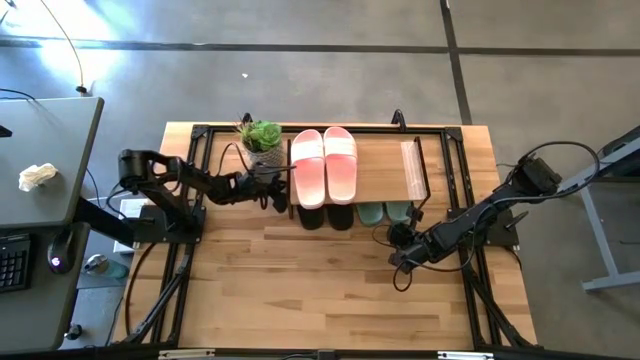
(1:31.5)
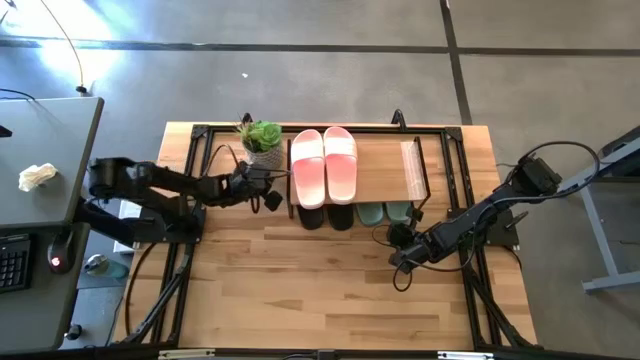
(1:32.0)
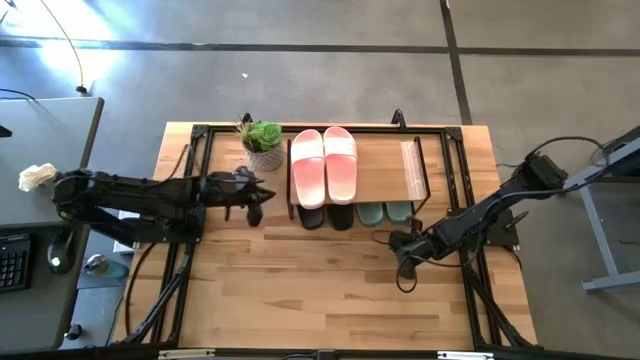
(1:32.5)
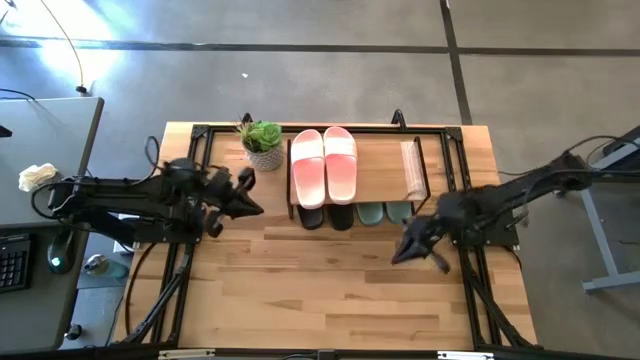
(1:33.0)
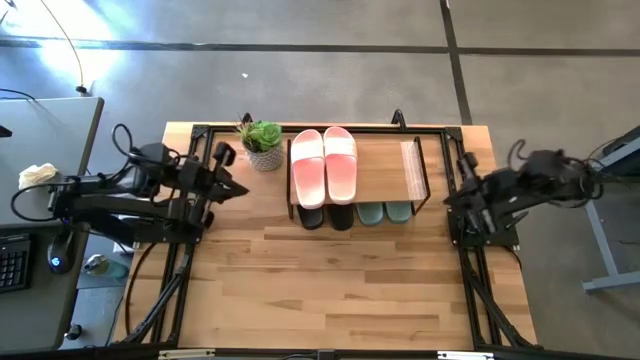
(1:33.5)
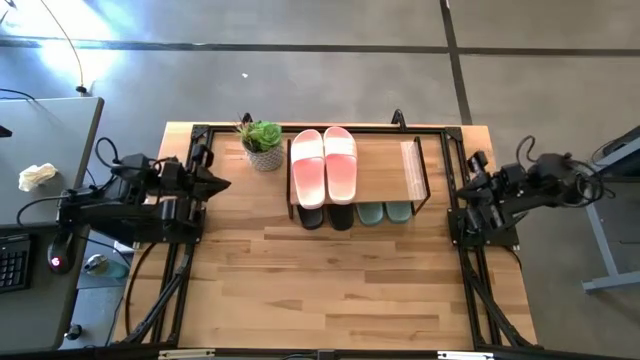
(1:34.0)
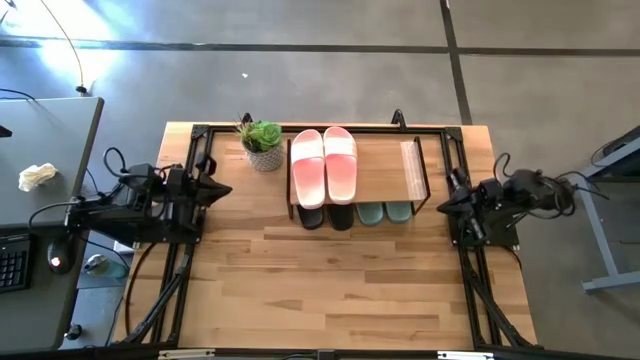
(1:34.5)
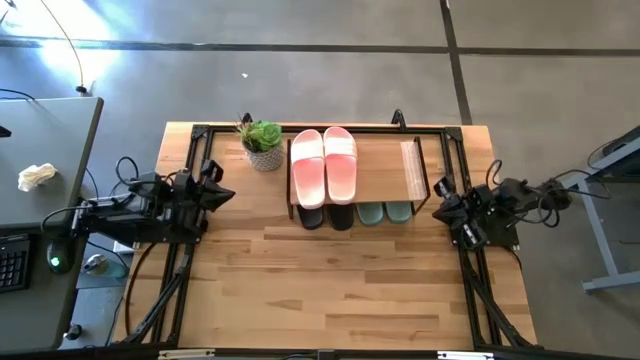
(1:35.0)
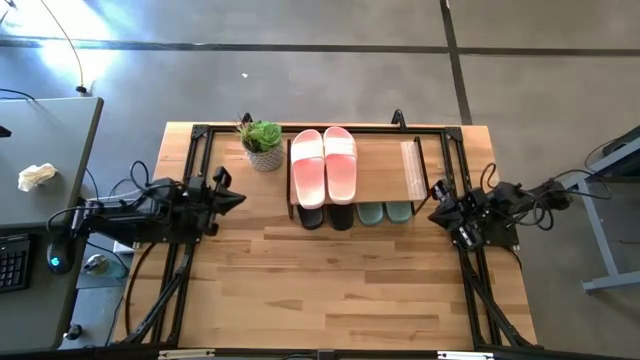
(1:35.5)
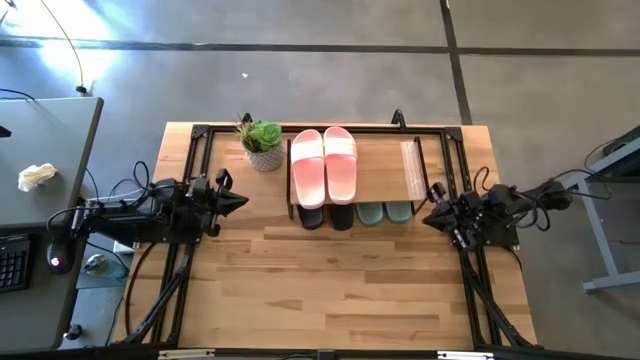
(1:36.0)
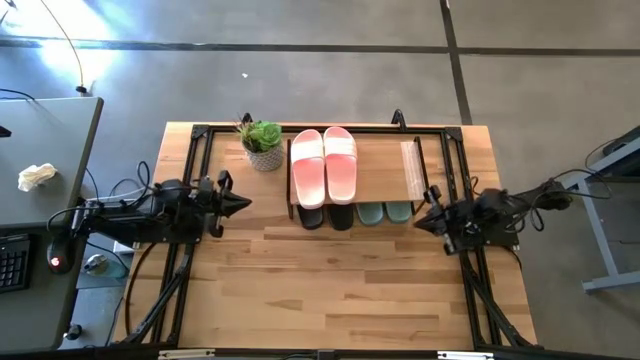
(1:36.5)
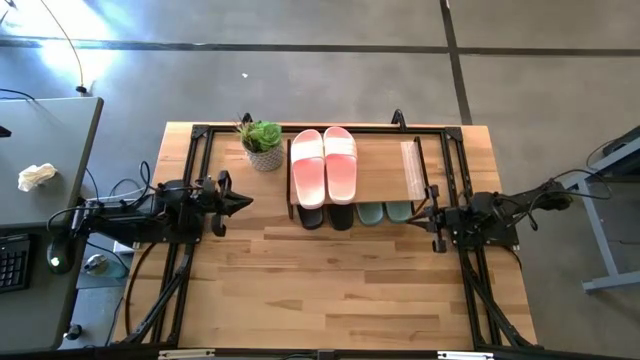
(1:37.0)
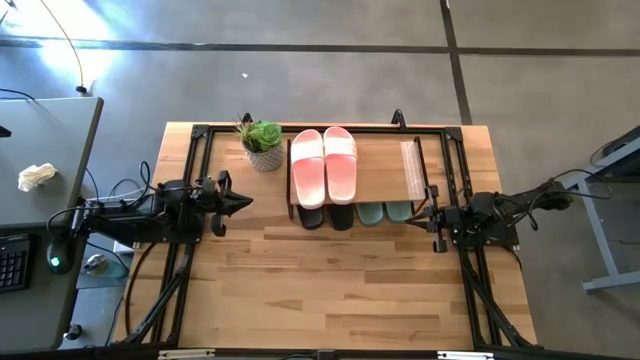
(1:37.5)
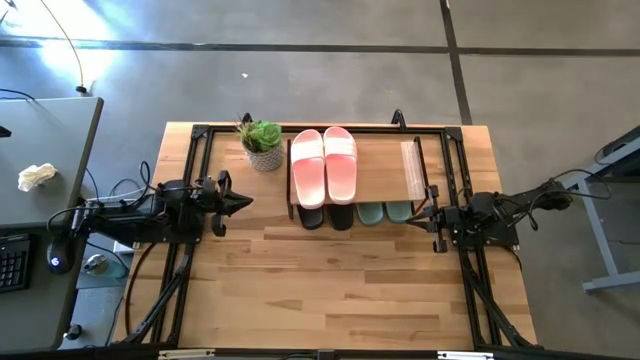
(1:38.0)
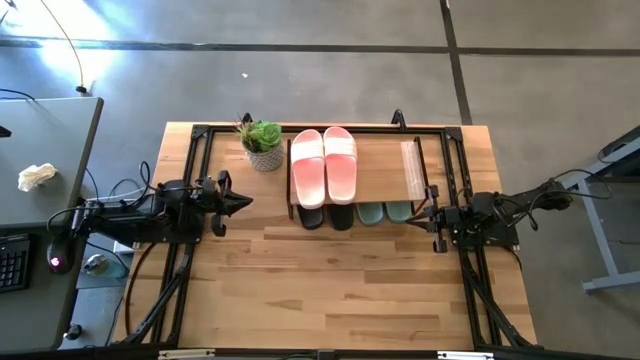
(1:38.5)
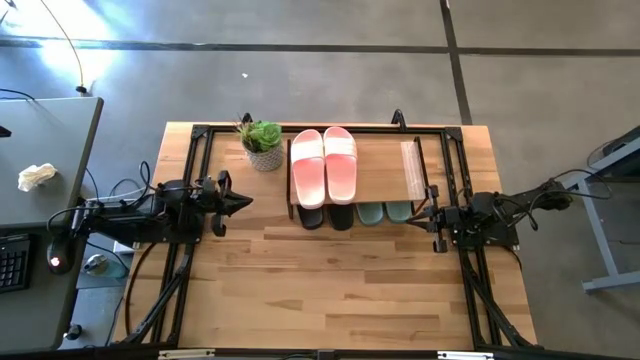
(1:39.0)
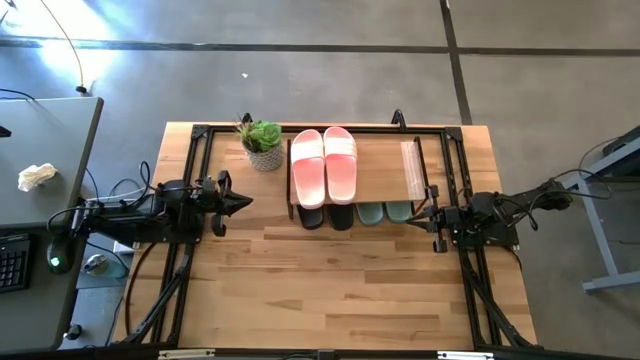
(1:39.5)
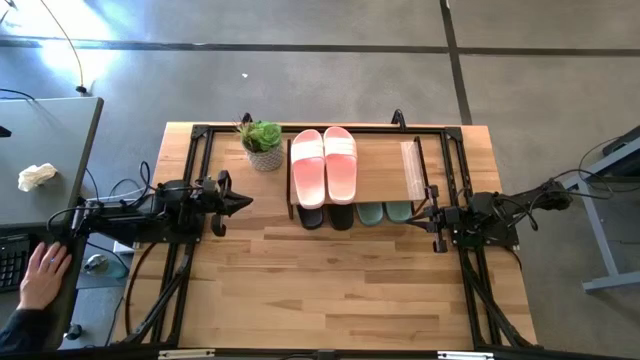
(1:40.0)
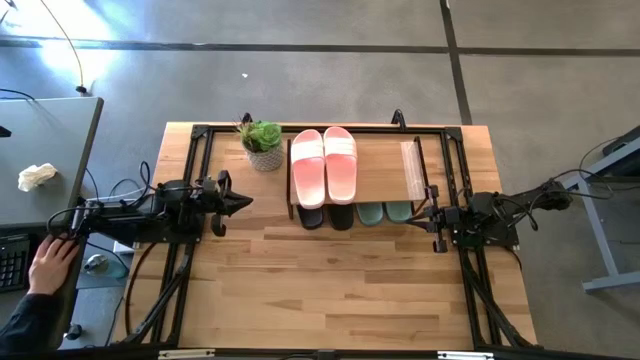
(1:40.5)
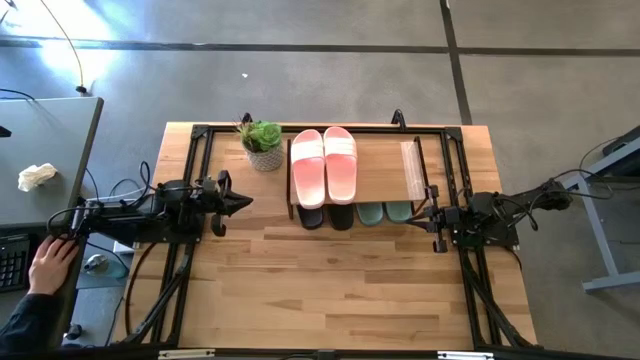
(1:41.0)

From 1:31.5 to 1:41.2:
Task: Pick and place slides into the shelf
Return to Home Position

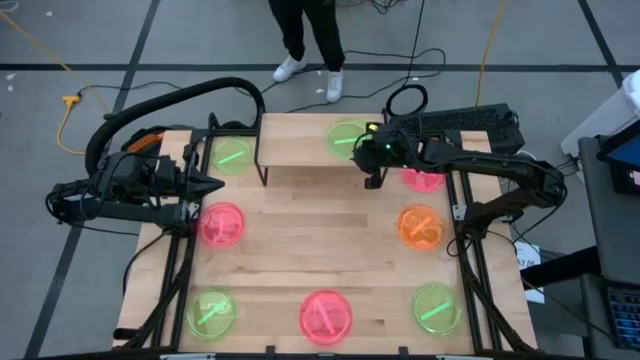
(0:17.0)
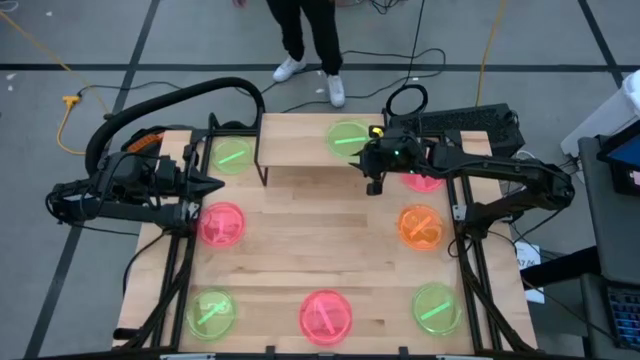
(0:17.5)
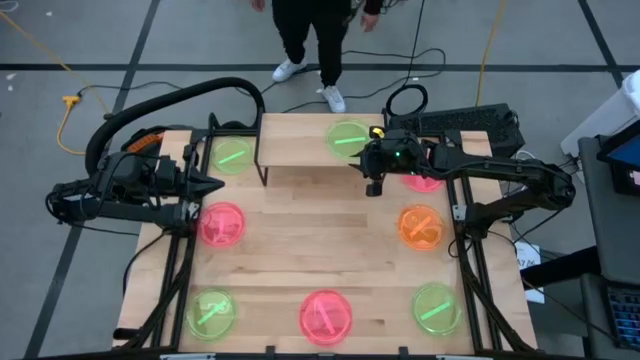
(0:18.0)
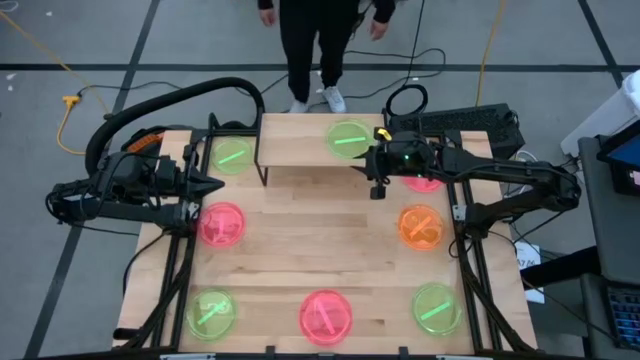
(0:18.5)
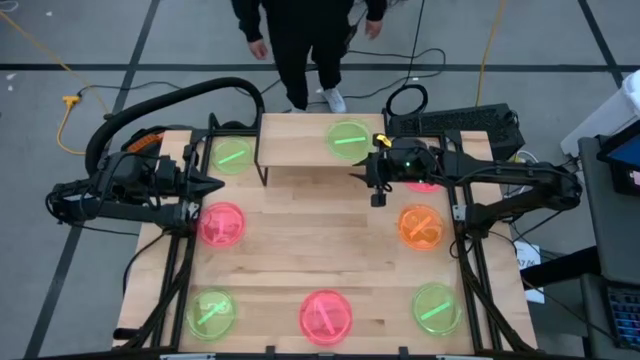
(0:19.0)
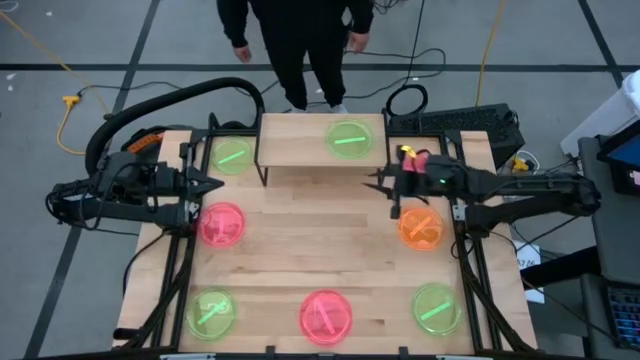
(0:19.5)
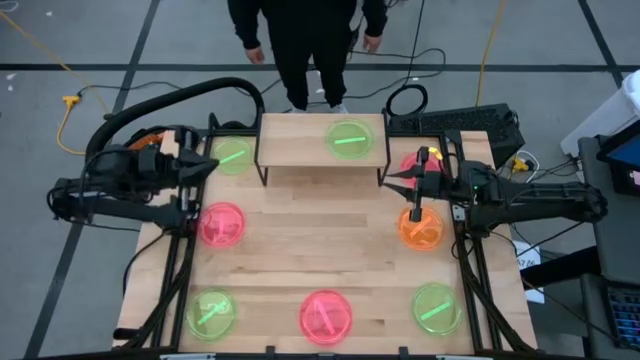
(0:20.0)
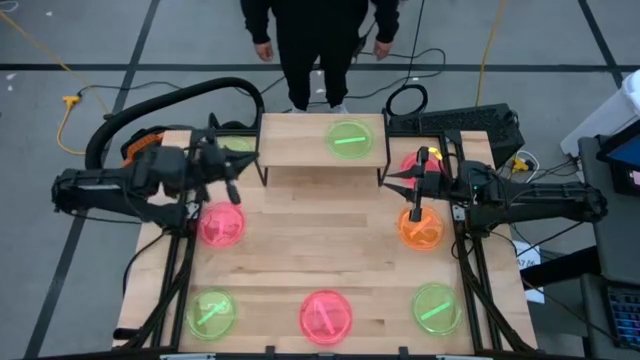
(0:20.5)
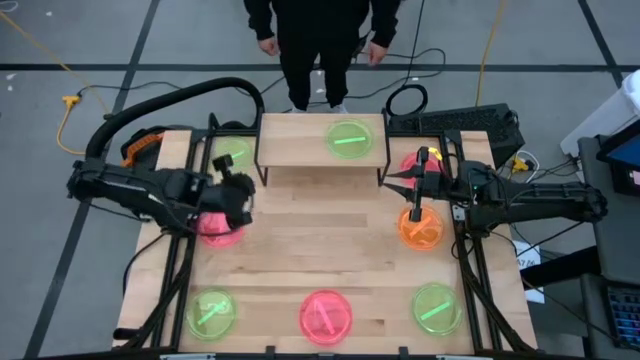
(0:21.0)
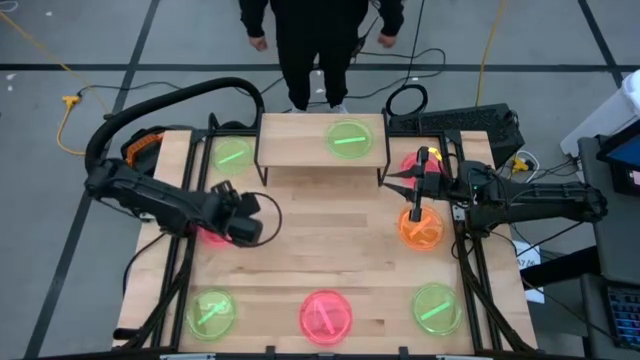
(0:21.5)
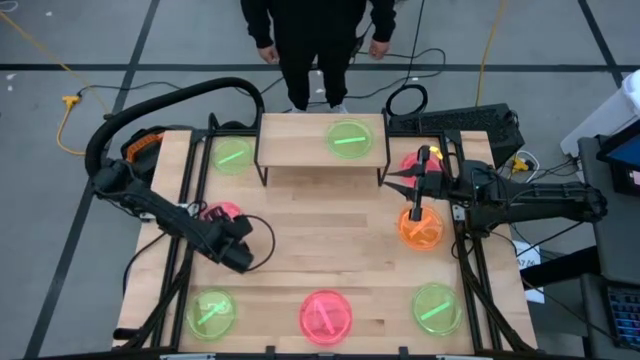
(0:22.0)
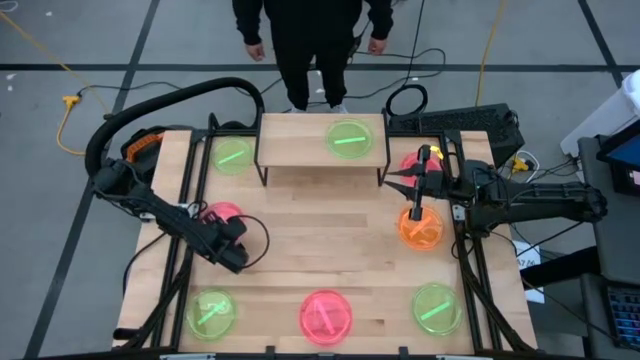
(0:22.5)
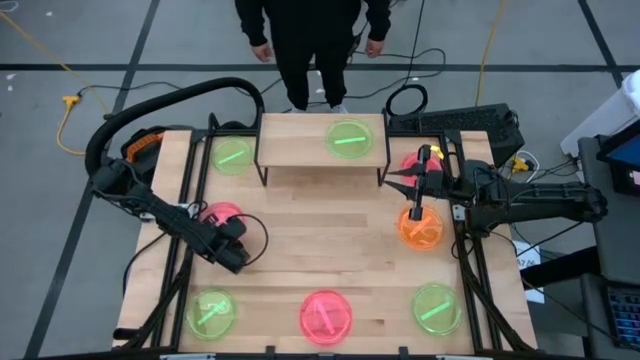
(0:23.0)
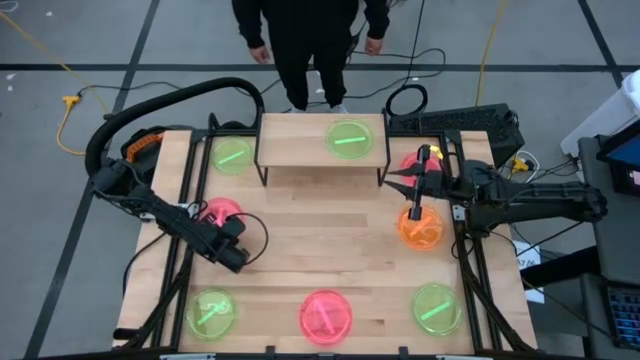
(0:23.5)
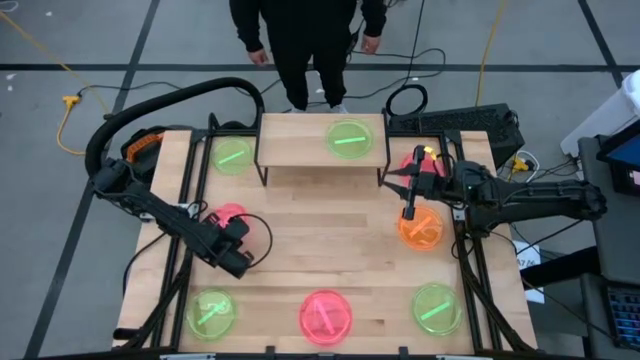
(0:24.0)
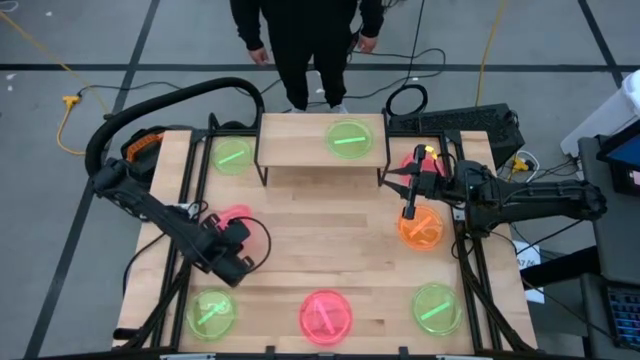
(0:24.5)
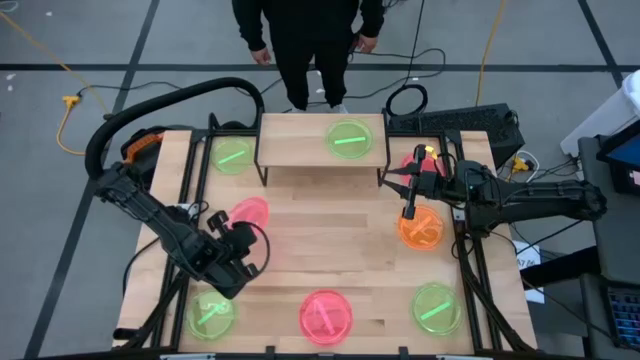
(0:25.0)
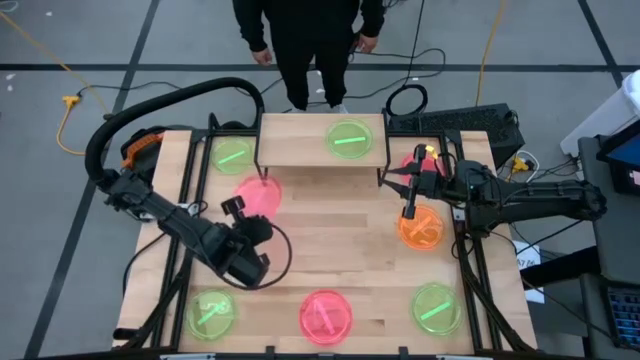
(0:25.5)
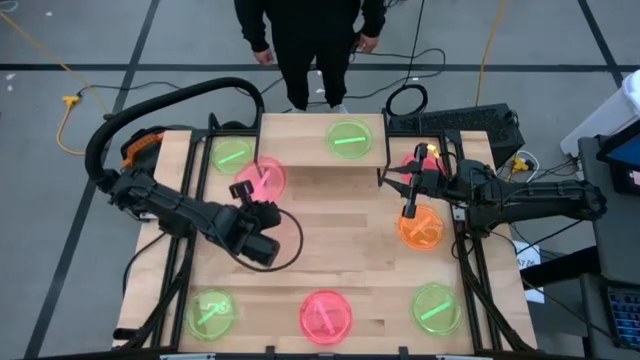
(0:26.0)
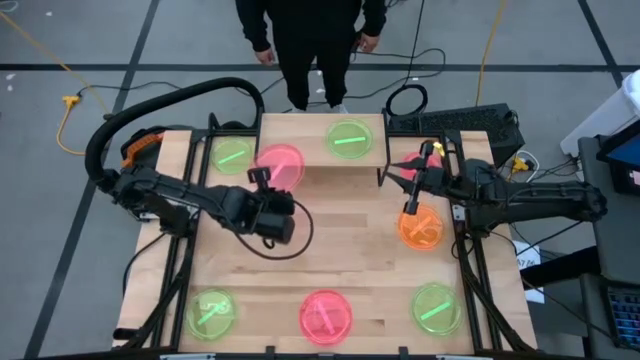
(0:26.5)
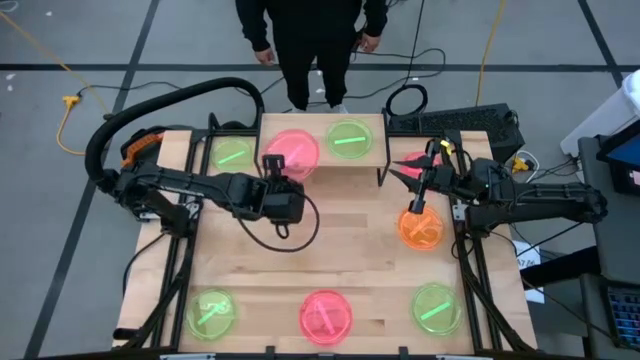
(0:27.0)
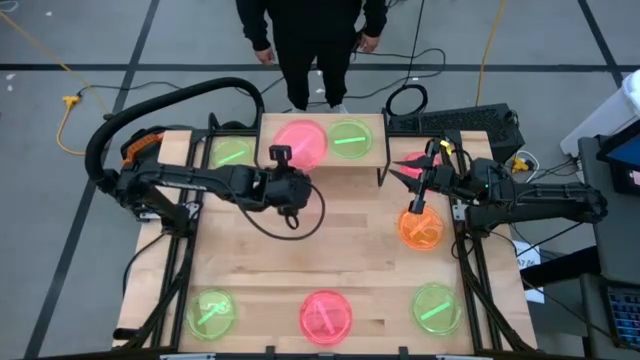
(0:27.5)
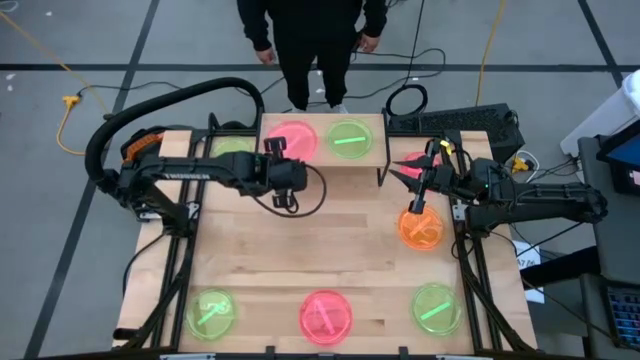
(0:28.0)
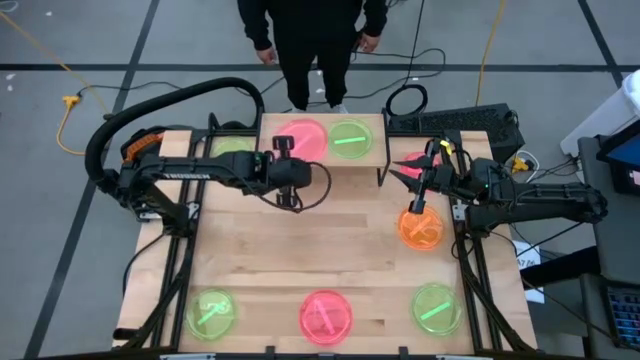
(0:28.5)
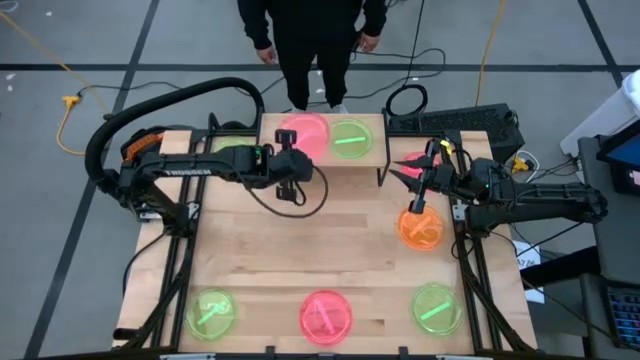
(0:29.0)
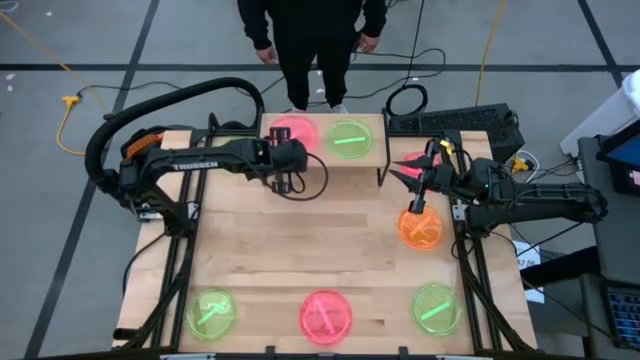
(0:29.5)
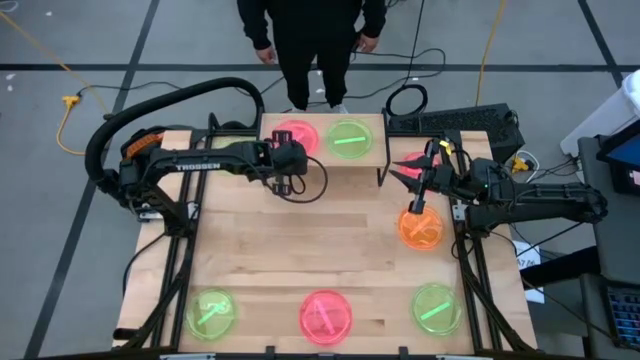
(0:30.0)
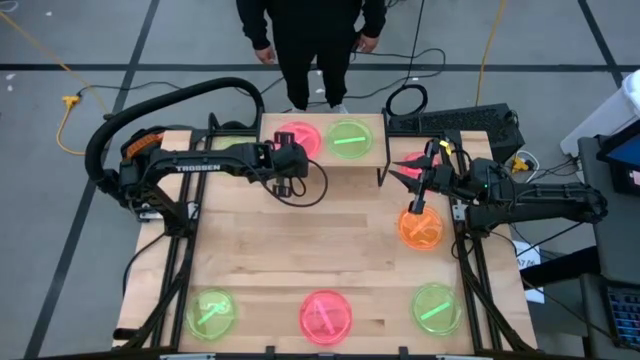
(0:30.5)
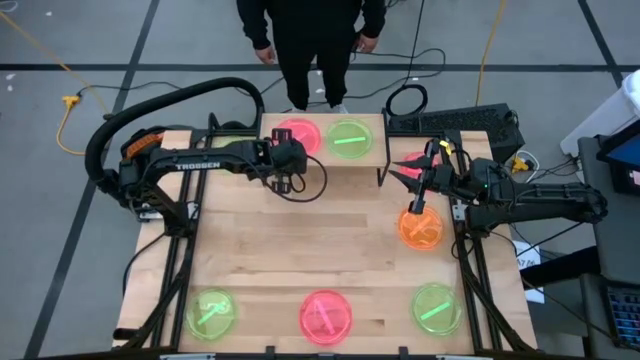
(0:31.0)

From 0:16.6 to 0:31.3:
Task: Place and stack plates onto a shelf
Put the pink plate on the shelf
